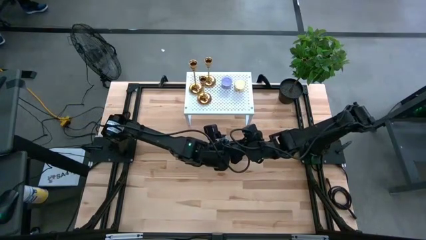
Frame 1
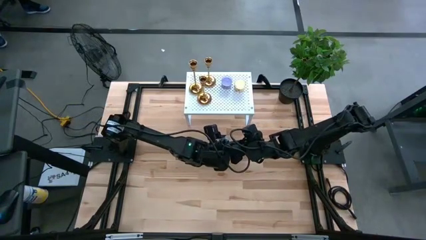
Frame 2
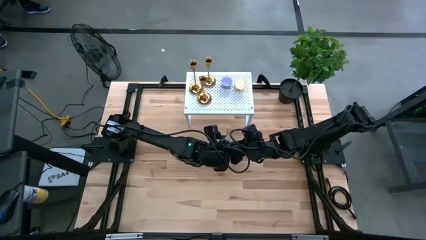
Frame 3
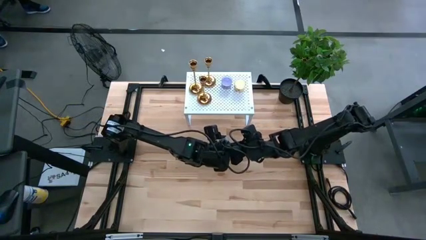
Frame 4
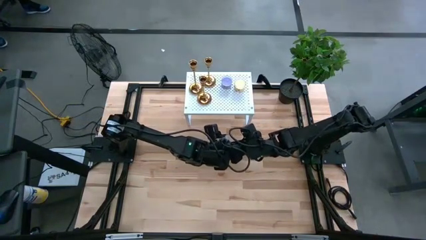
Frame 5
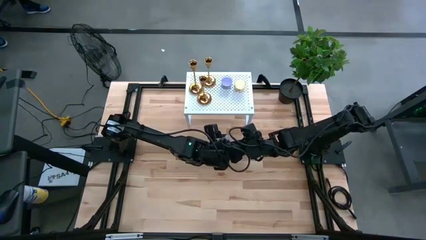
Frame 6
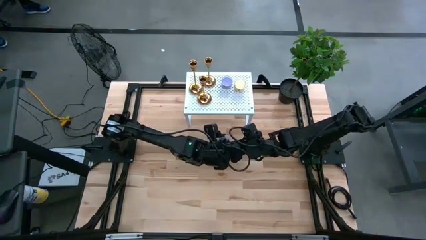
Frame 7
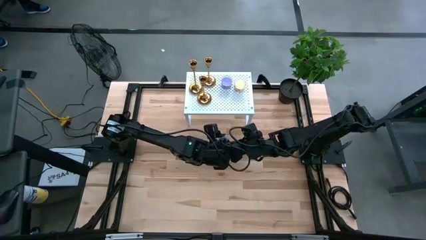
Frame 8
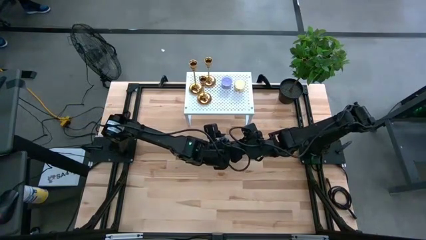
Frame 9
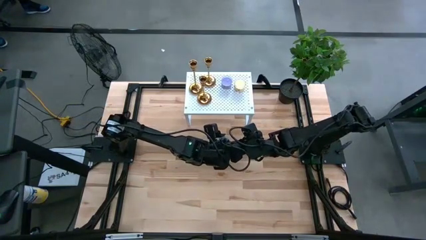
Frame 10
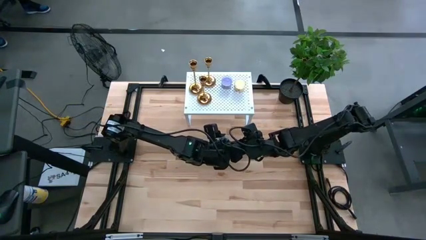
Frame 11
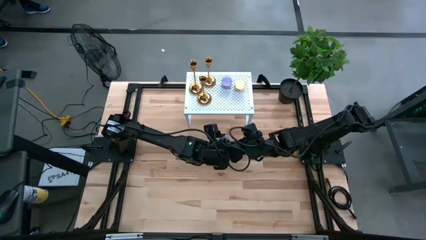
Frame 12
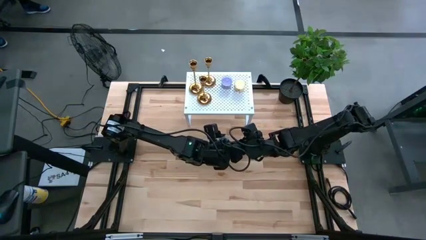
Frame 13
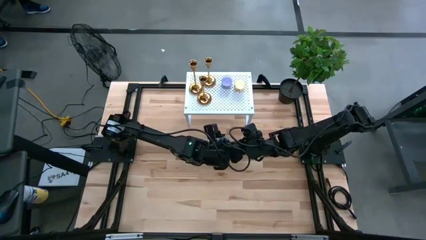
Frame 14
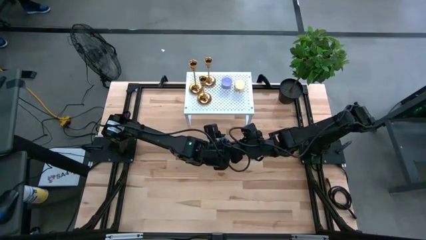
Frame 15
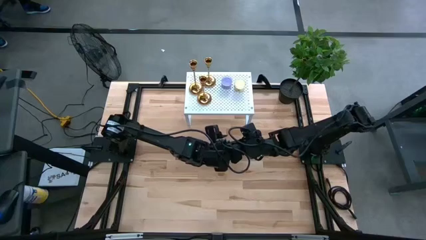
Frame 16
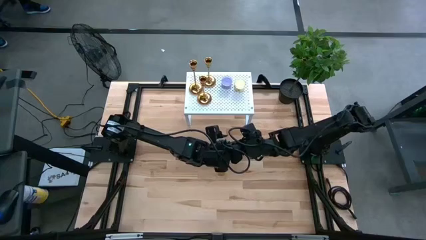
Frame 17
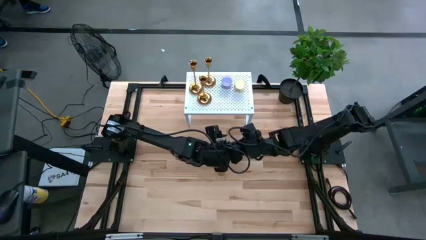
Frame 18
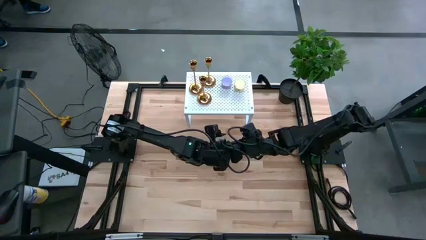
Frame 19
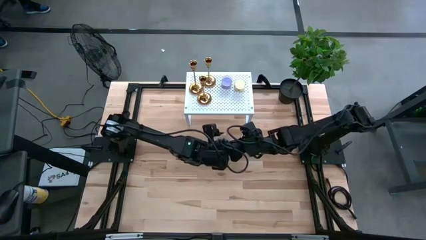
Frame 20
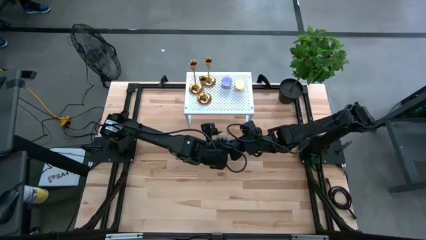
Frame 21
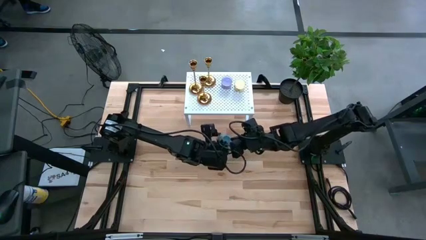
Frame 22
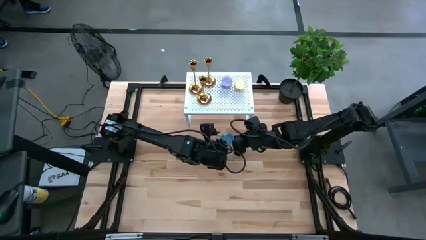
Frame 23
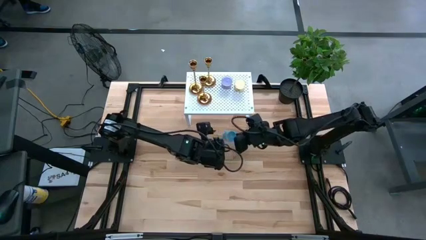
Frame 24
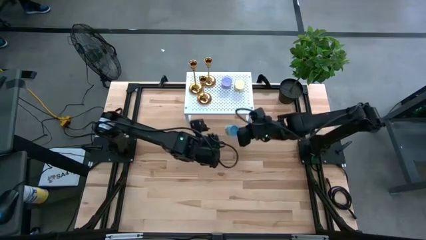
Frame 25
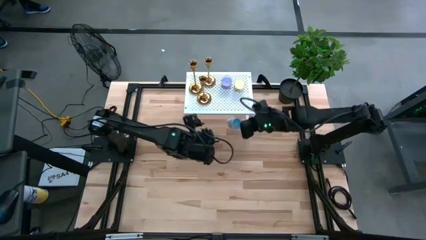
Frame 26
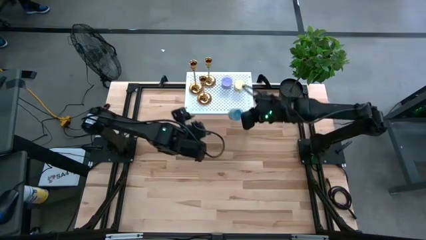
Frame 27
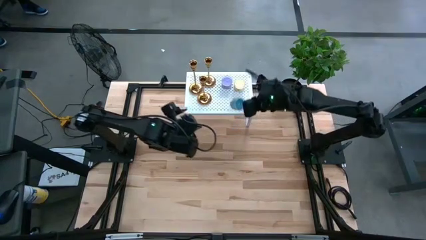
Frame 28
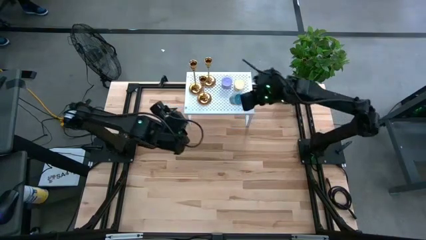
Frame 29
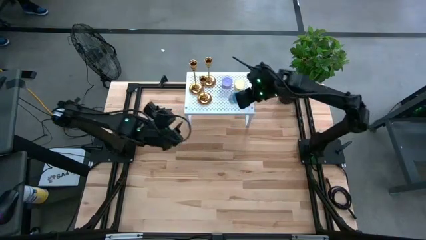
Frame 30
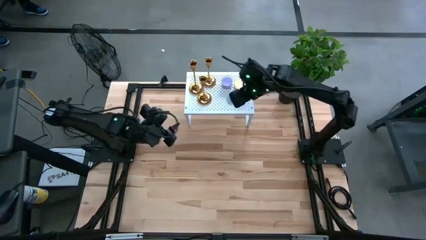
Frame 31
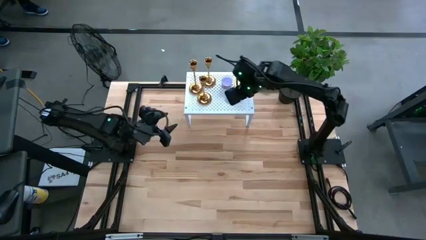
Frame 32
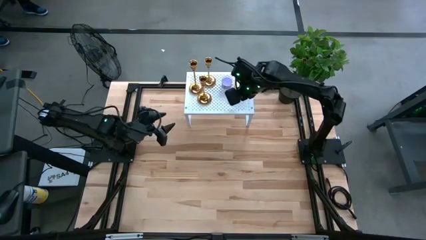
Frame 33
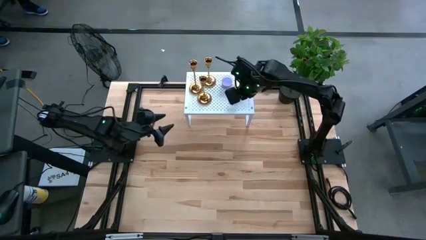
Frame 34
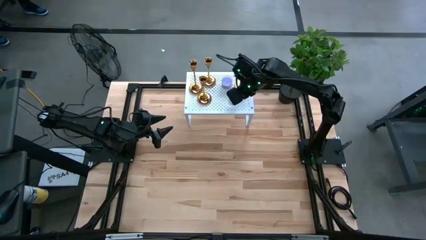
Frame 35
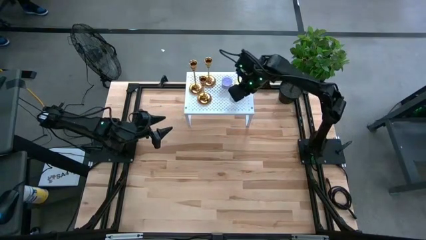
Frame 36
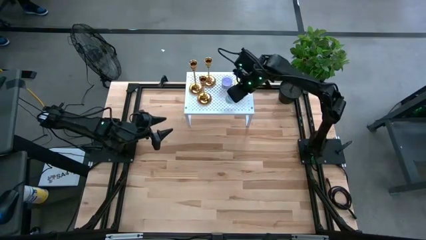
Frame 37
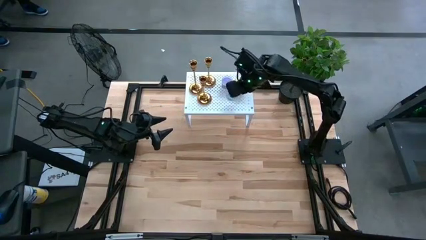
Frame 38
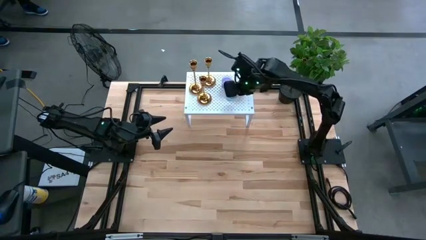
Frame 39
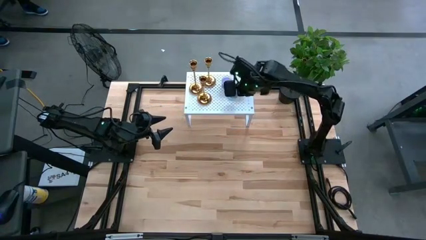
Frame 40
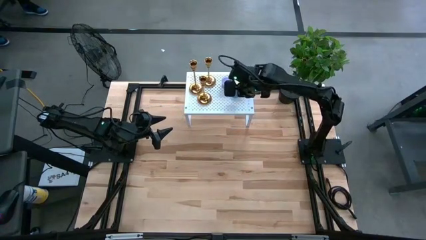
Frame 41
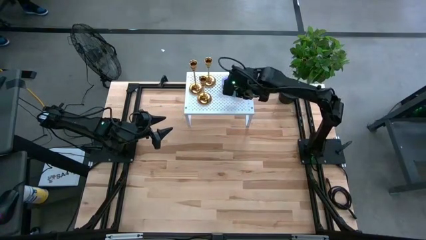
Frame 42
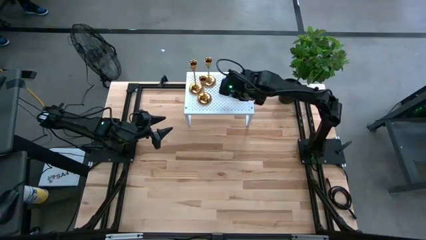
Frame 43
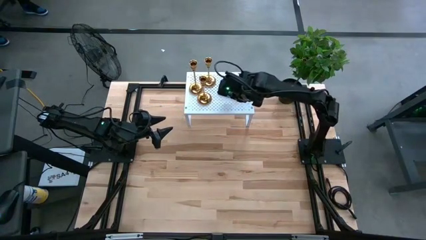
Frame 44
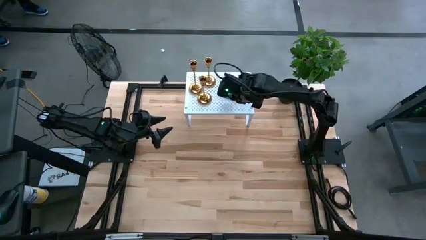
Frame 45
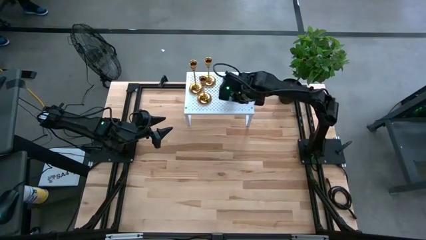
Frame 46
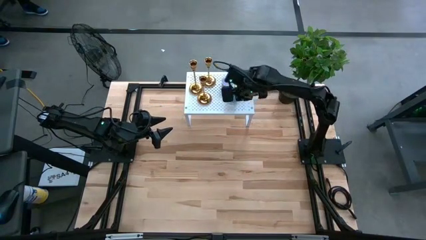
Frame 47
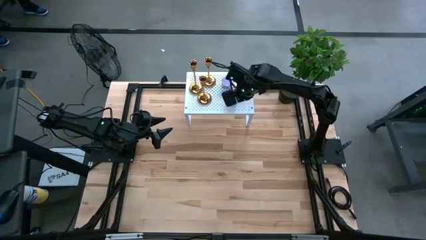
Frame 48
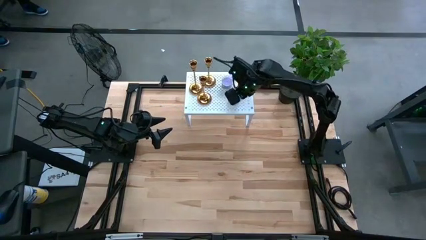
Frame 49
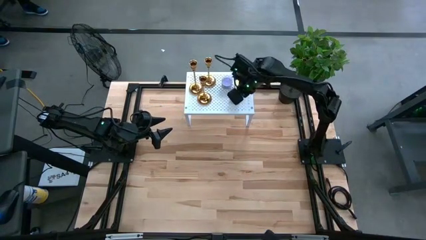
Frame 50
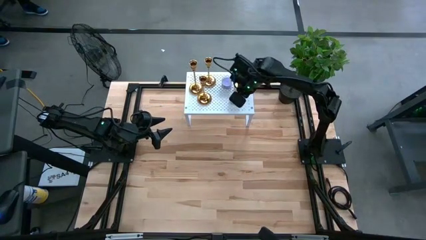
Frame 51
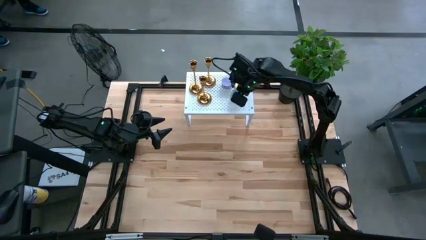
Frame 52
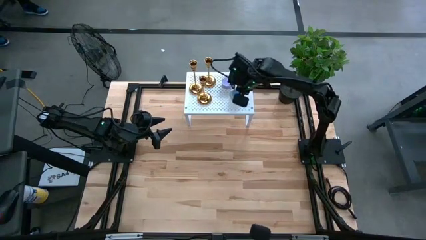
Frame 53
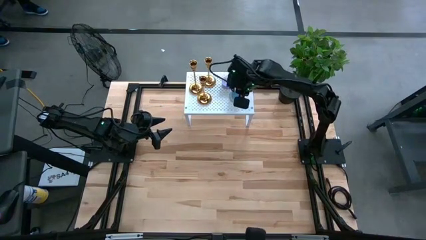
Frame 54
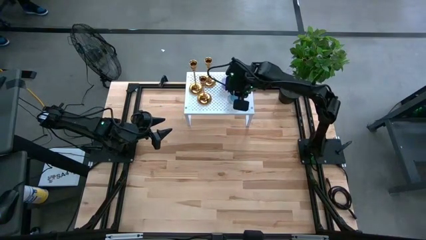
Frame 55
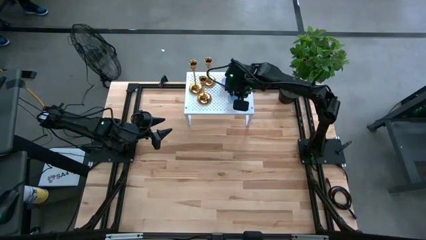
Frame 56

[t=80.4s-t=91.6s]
Task: Pick & Place candle stick holders
Put the blue scented candle on the shelf

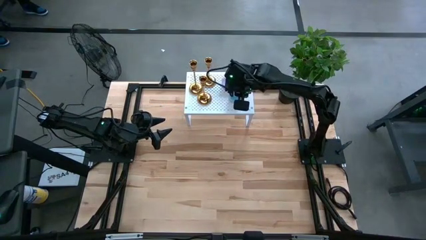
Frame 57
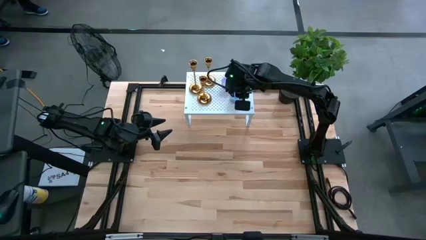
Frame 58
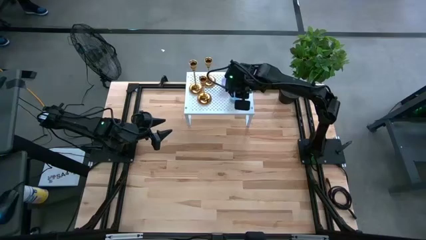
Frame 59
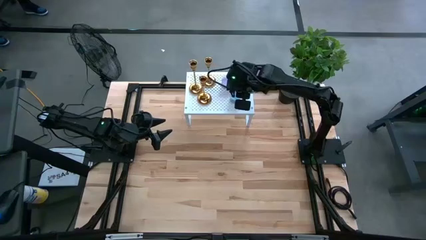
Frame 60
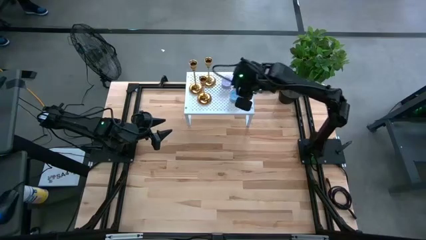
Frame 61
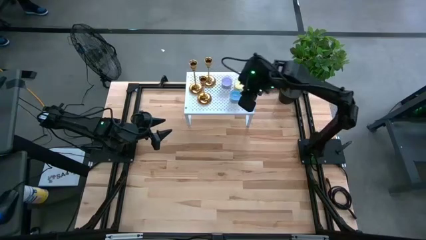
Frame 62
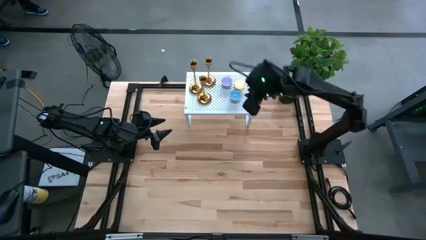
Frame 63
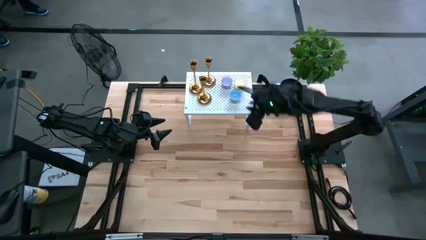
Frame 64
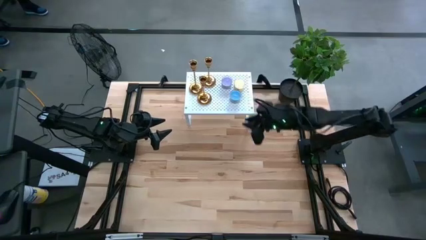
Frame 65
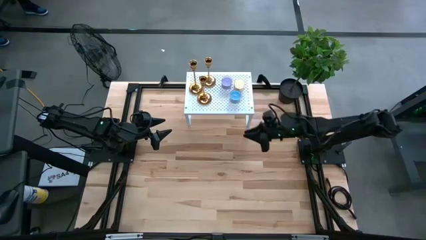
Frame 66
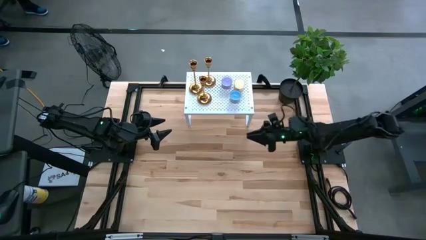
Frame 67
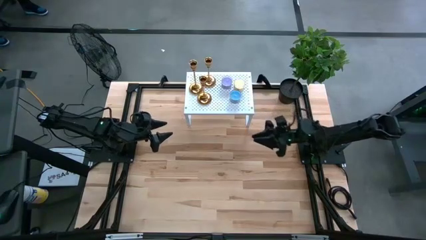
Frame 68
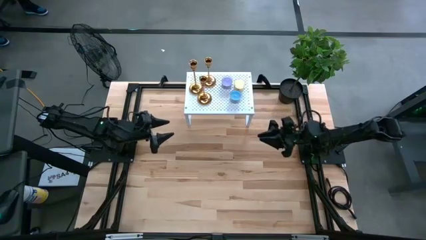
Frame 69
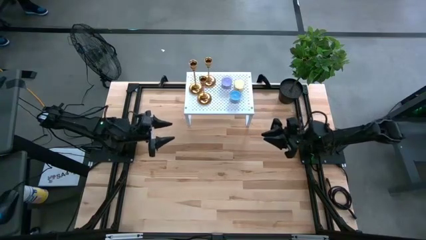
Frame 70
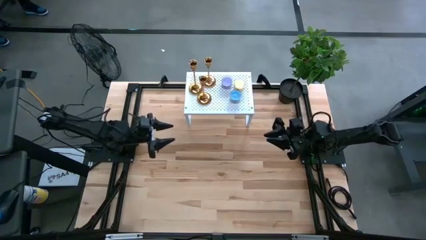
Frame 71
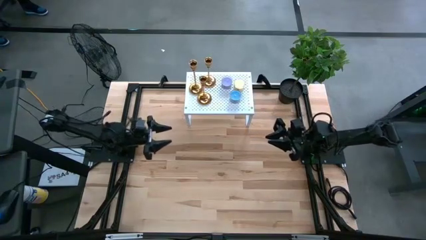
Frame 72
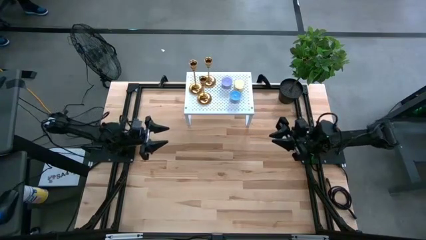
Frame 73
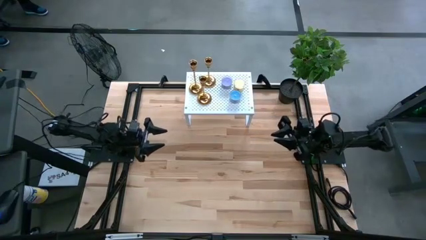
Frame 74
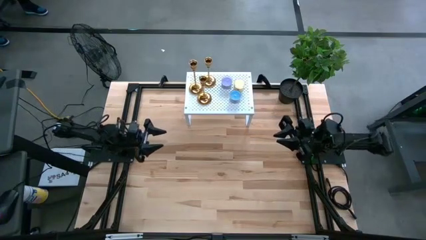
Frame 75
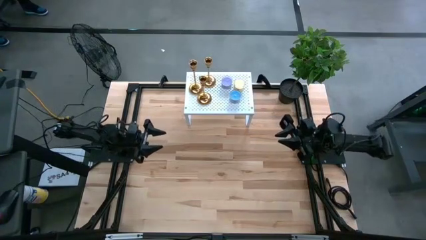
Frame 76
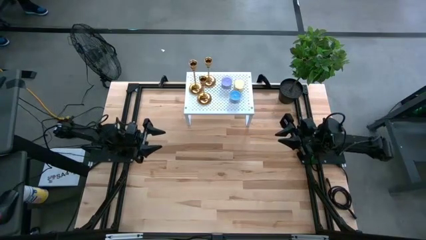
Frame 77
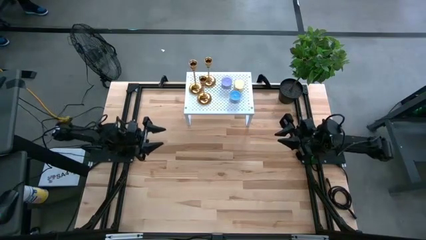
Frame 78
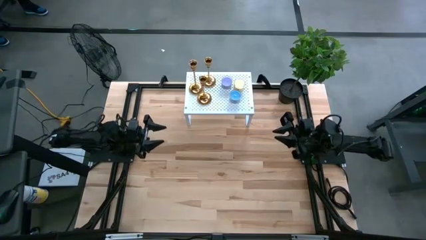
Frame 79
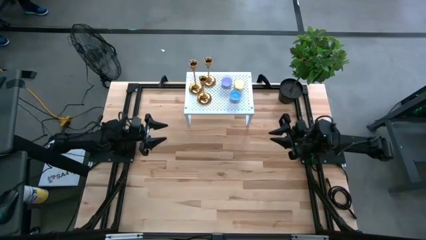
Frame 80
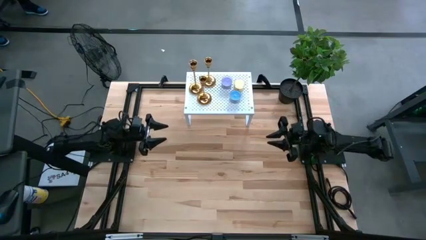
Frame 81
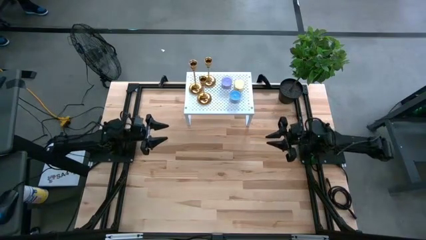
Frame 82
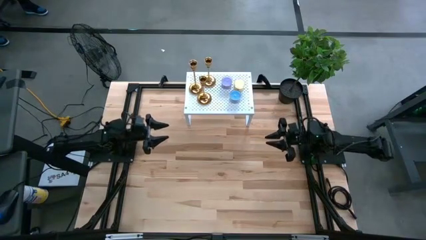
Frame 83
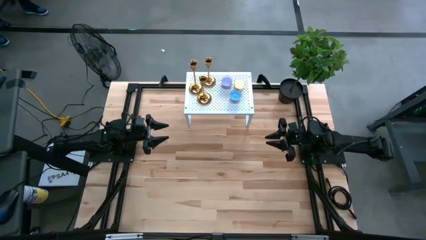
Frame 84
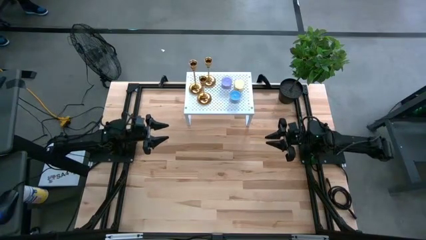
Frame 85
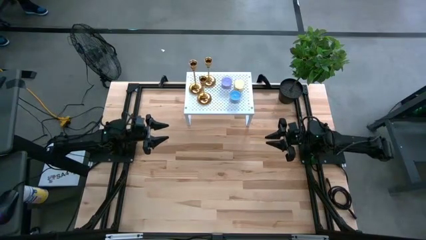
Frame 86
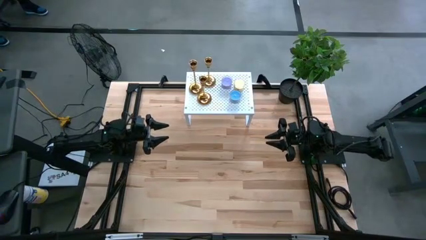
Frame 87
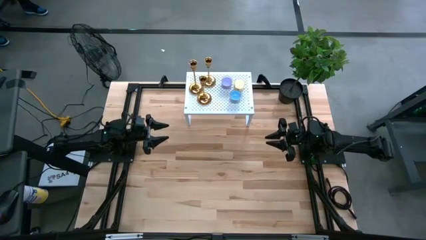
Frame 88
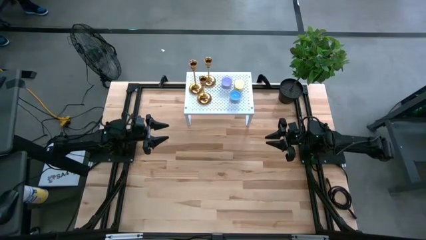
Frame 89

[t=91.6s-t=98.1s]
Return to Home Position
